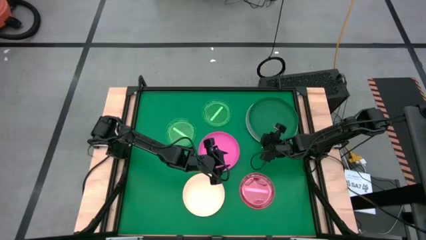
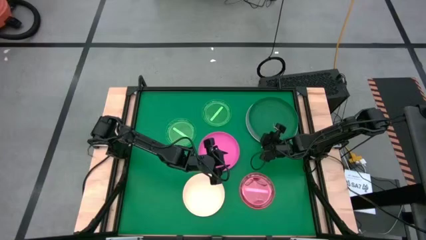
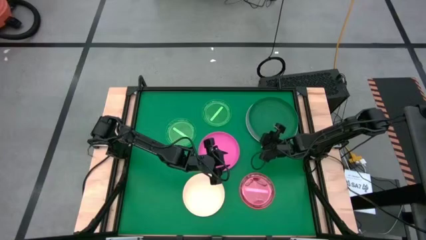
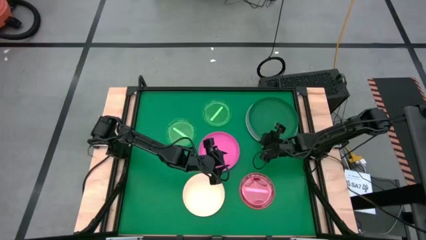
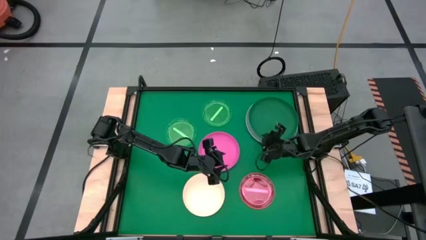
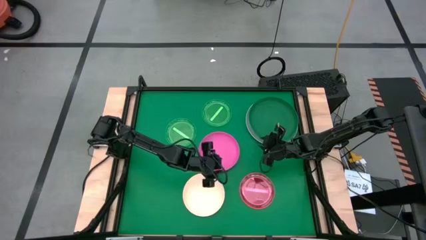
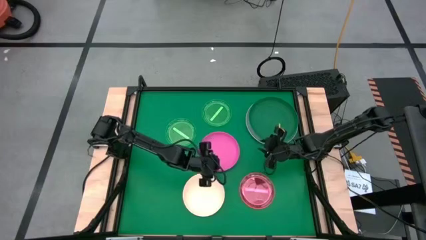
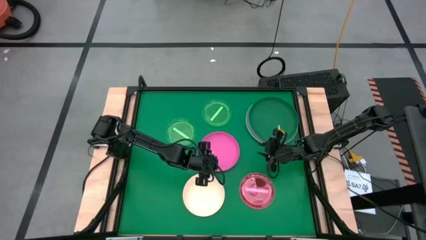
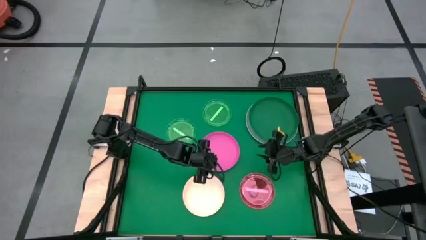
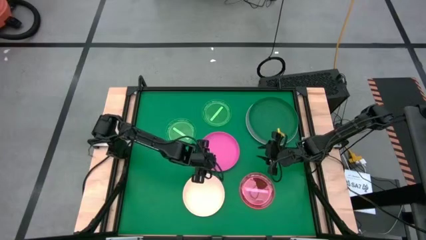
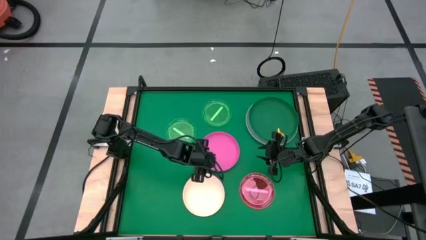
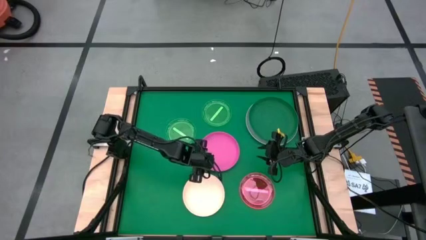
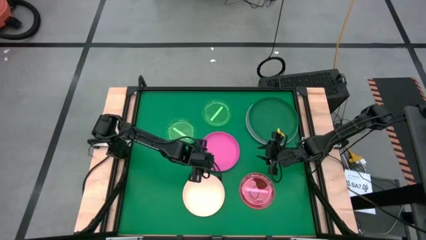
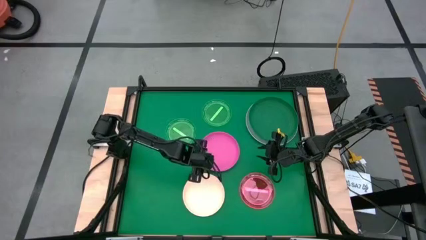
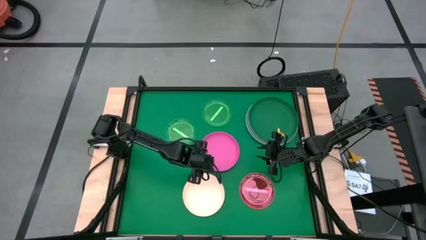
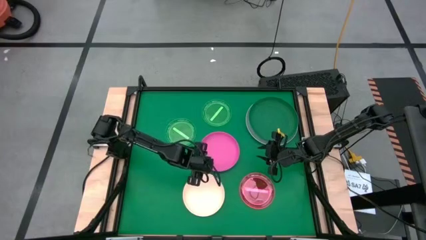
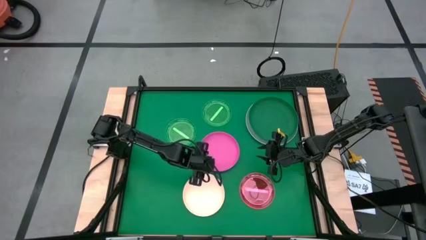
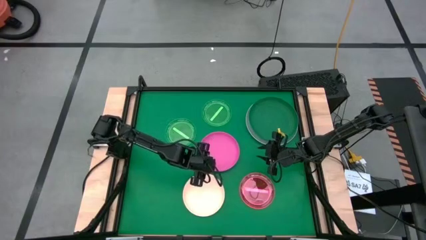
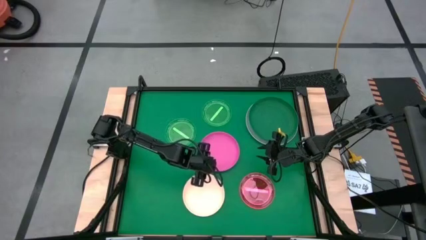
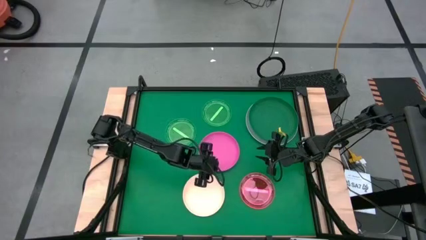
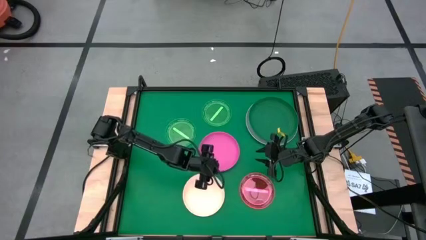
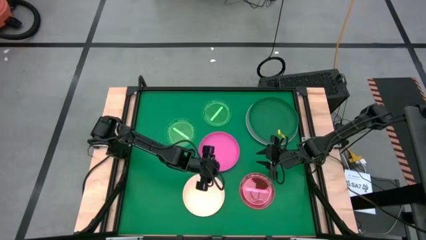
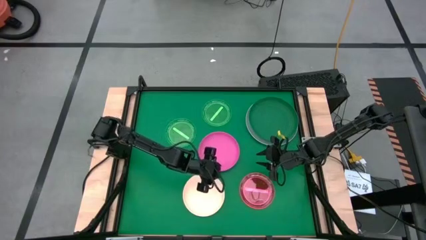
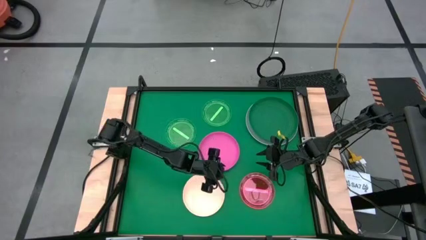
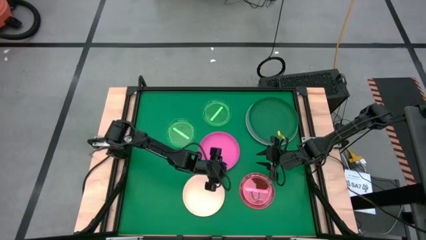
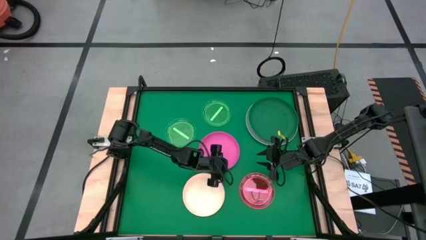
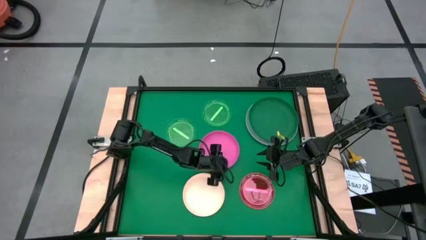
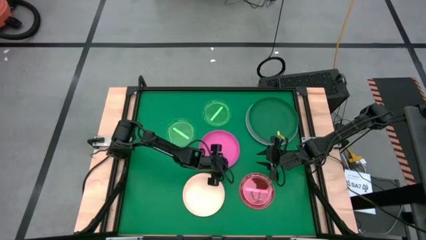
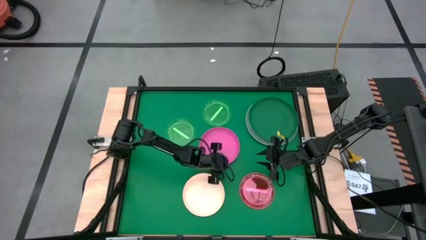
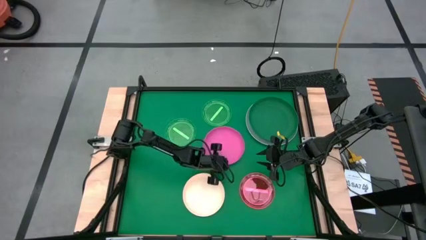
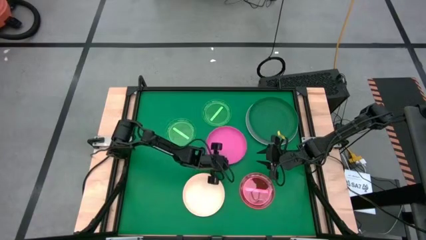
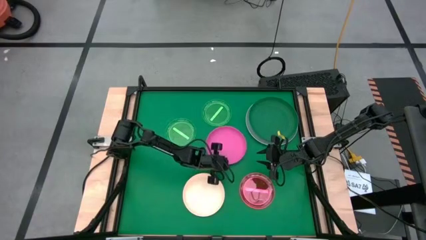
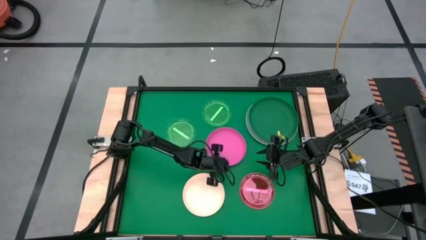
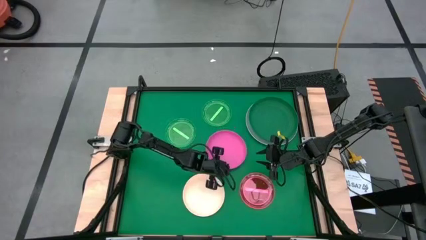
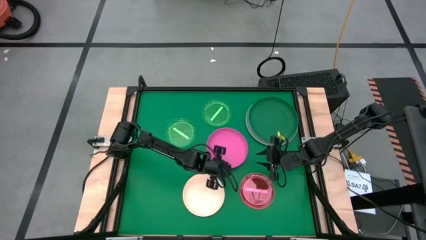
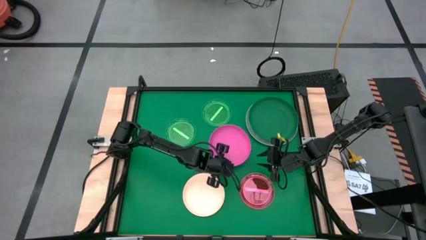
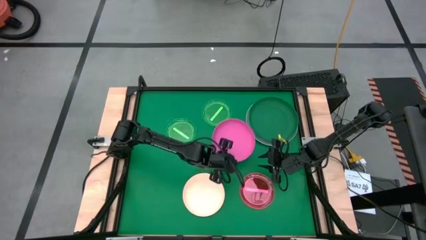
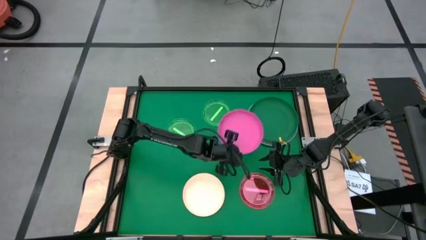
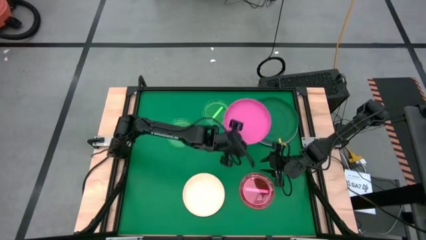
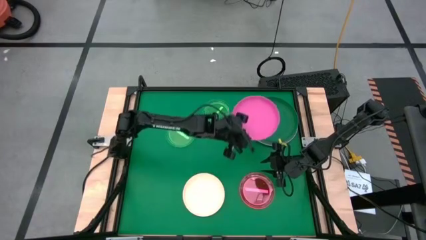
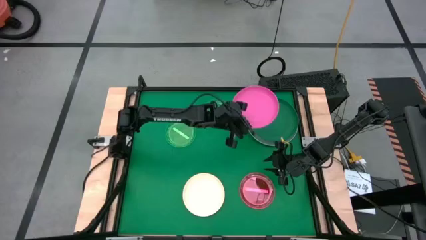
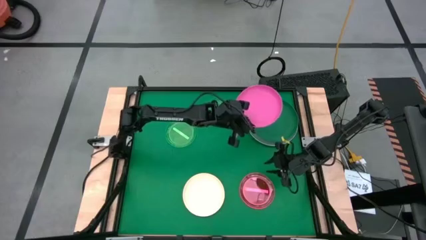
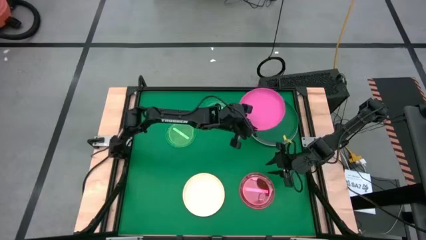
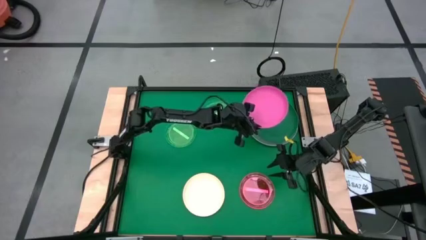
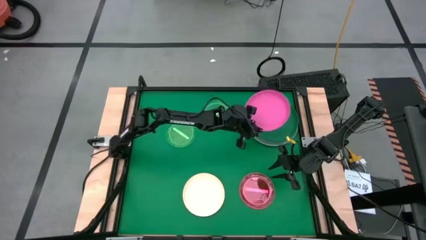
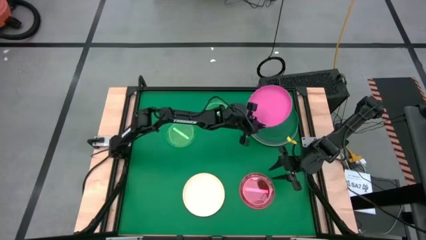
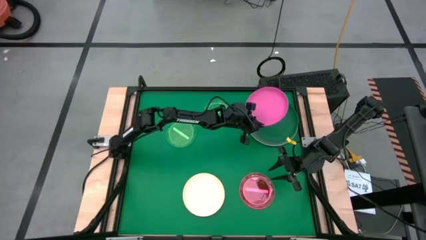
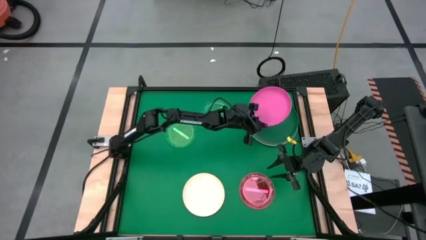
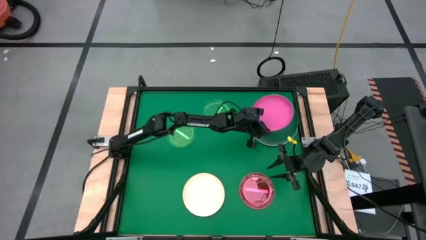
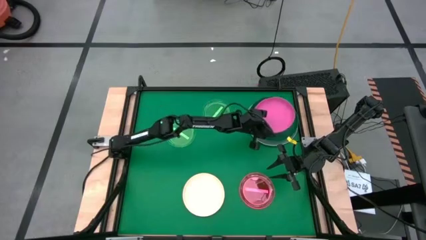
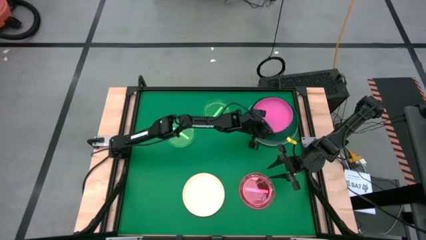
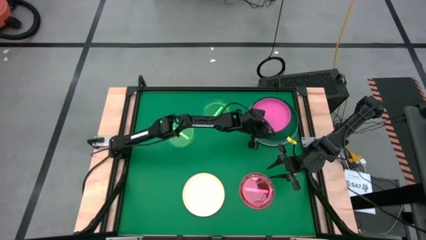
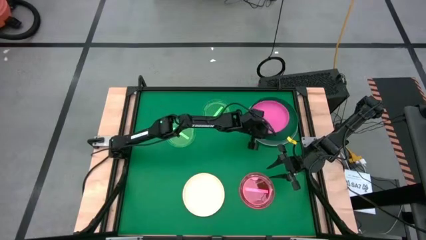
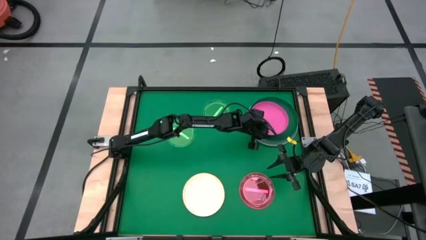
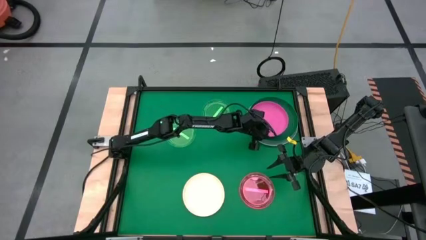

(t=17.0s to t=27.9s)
Task: Stack plastic plates
Stack the pink plate on top of the green plate
